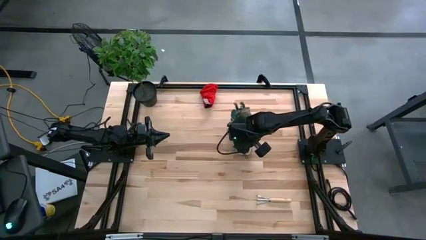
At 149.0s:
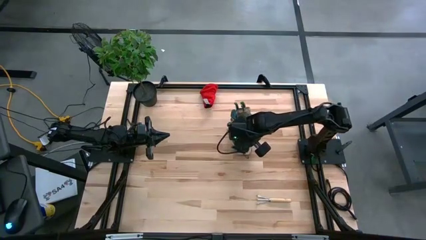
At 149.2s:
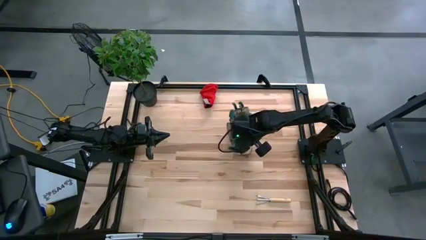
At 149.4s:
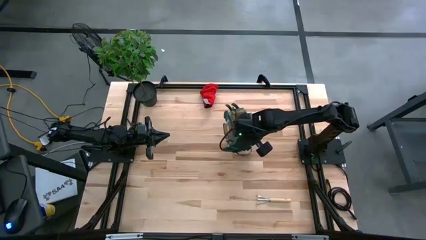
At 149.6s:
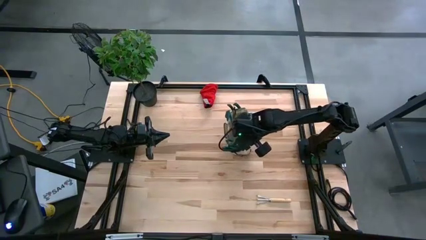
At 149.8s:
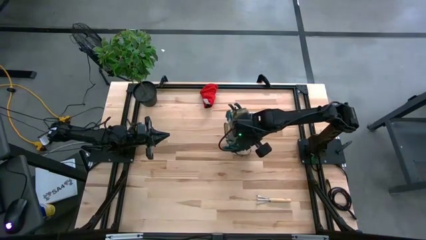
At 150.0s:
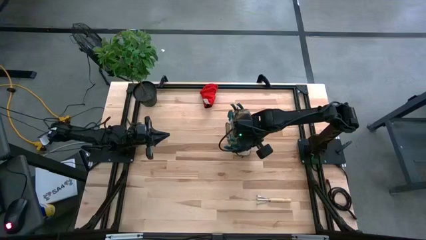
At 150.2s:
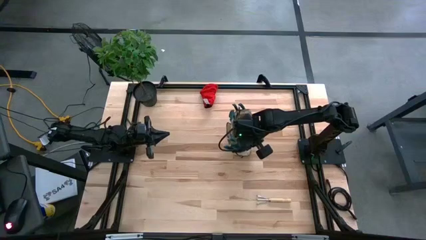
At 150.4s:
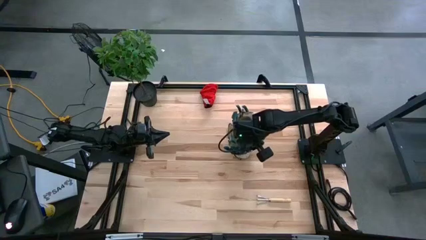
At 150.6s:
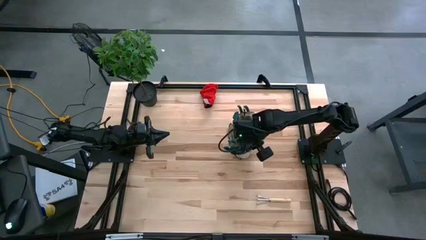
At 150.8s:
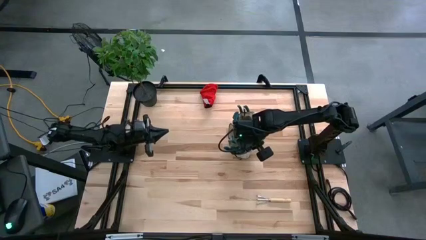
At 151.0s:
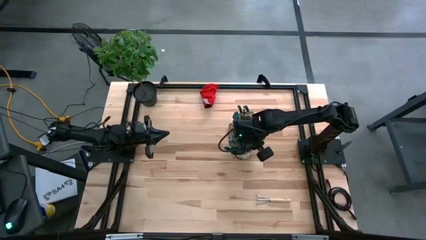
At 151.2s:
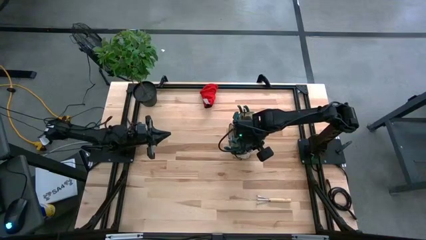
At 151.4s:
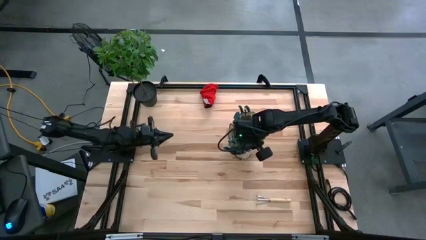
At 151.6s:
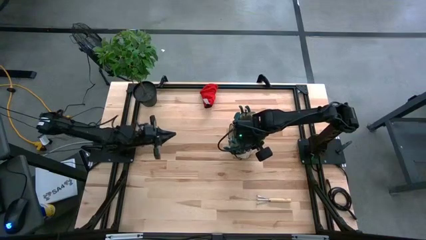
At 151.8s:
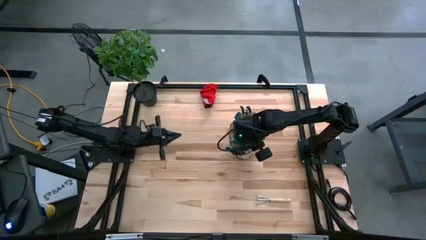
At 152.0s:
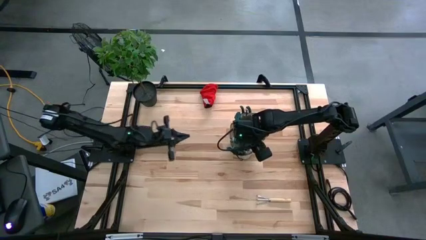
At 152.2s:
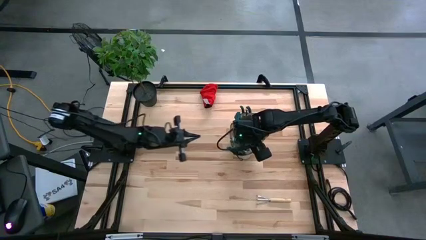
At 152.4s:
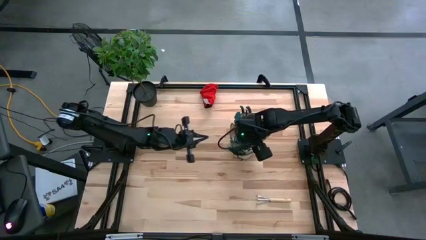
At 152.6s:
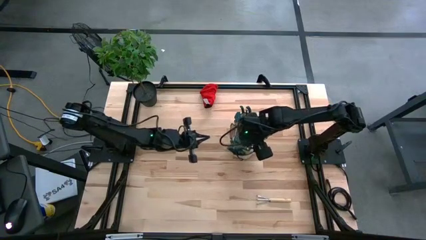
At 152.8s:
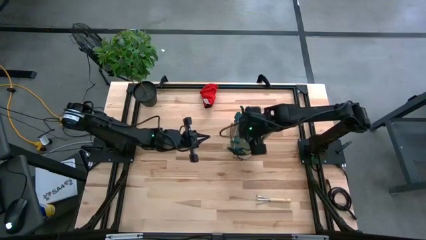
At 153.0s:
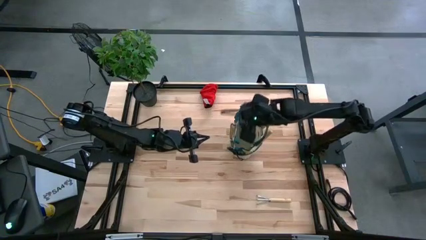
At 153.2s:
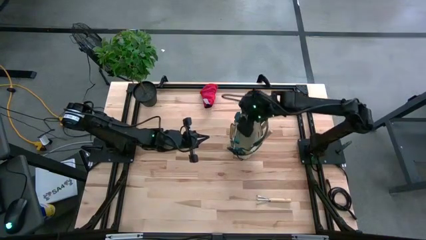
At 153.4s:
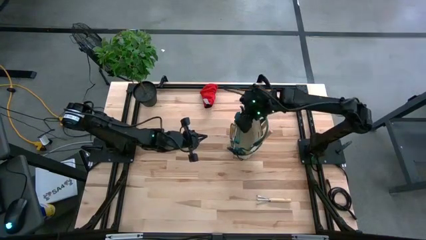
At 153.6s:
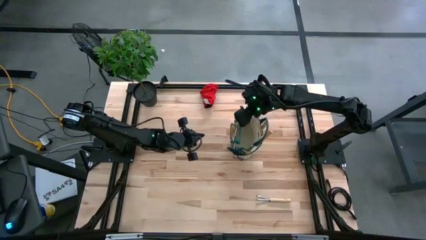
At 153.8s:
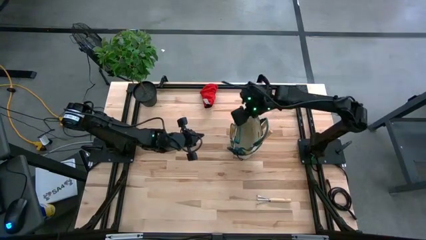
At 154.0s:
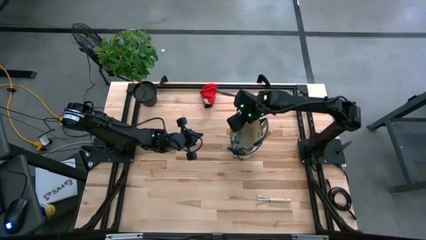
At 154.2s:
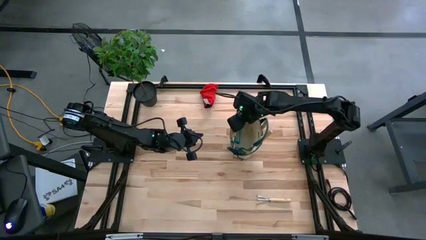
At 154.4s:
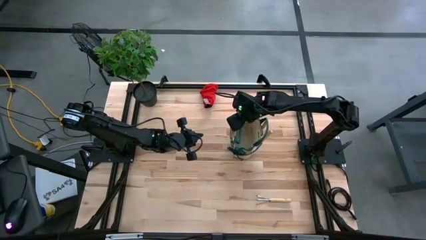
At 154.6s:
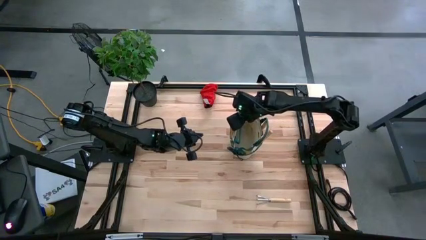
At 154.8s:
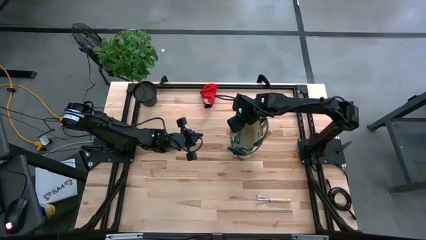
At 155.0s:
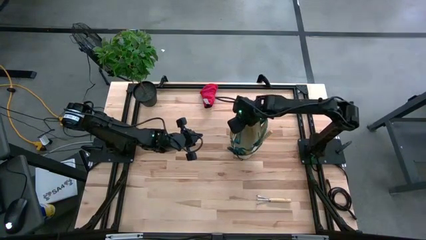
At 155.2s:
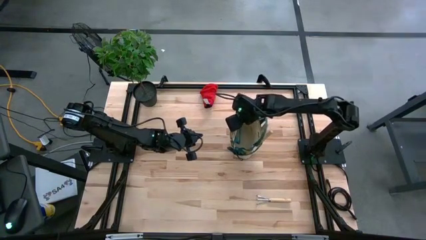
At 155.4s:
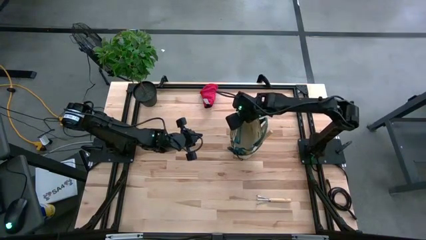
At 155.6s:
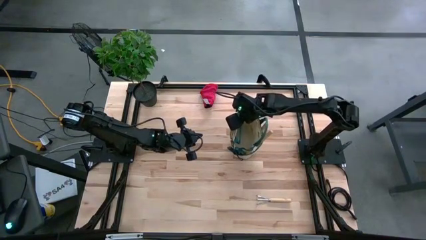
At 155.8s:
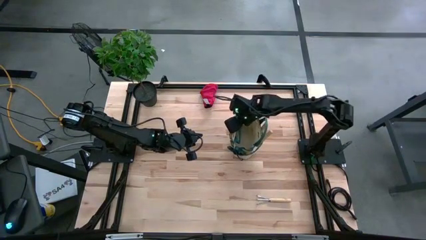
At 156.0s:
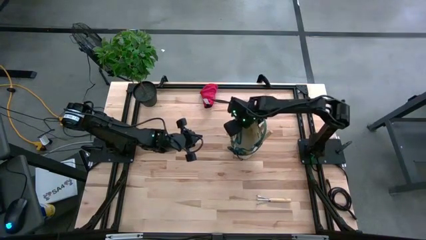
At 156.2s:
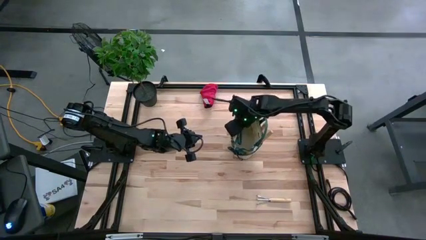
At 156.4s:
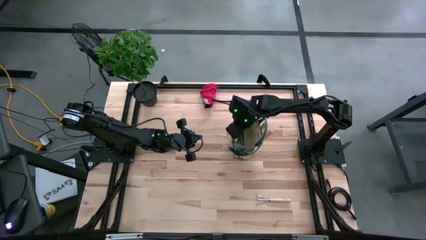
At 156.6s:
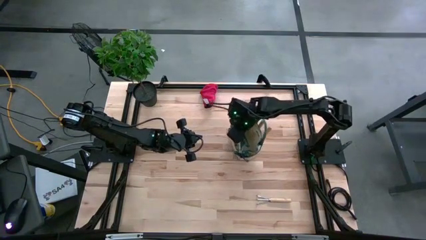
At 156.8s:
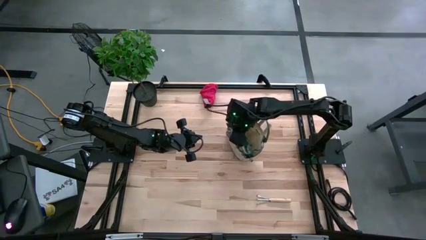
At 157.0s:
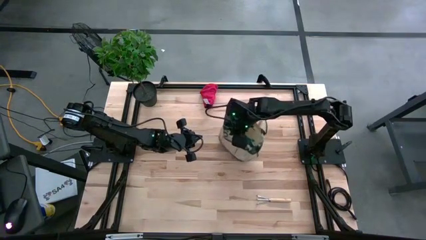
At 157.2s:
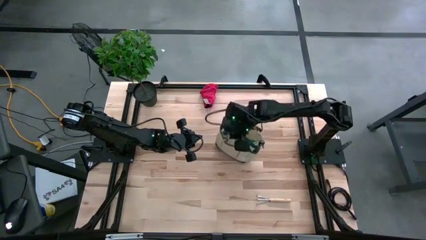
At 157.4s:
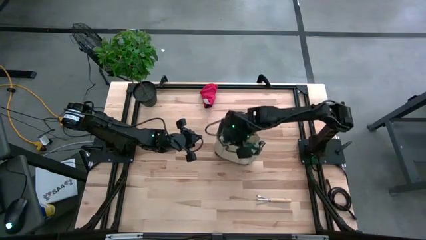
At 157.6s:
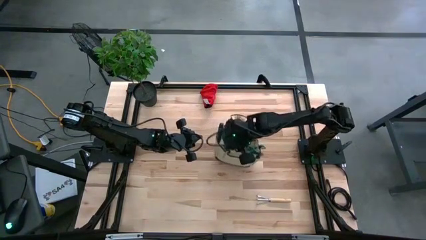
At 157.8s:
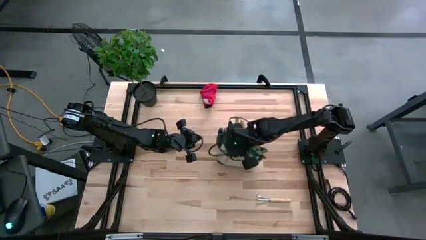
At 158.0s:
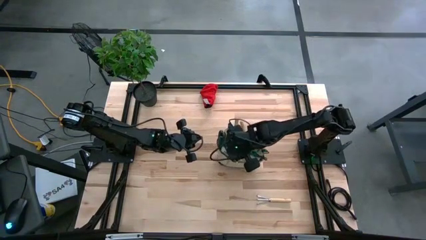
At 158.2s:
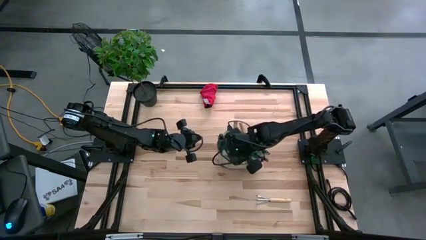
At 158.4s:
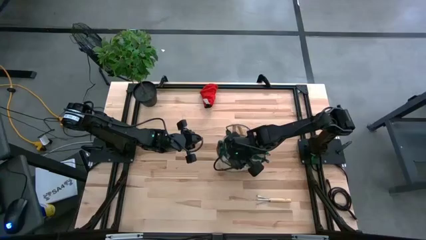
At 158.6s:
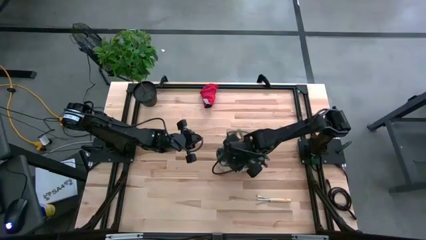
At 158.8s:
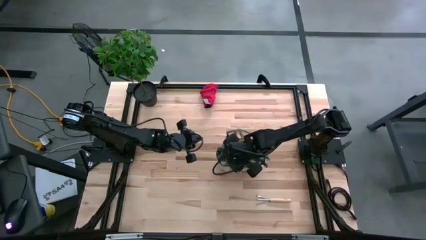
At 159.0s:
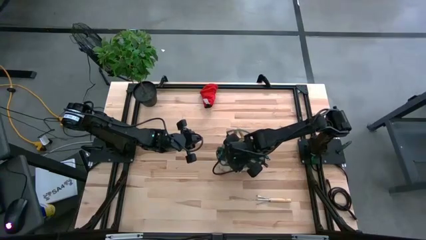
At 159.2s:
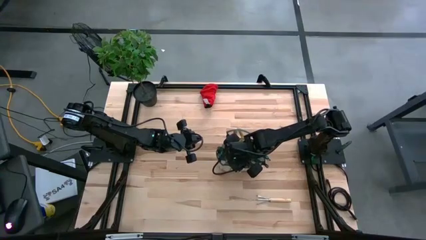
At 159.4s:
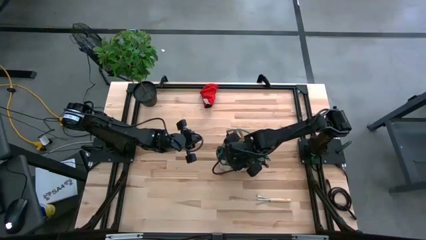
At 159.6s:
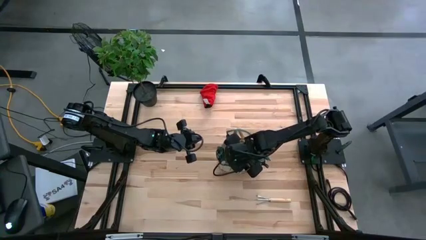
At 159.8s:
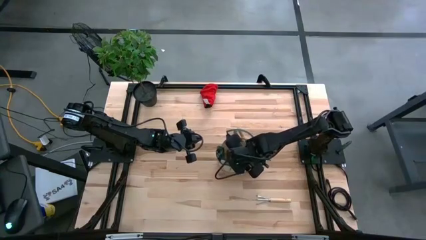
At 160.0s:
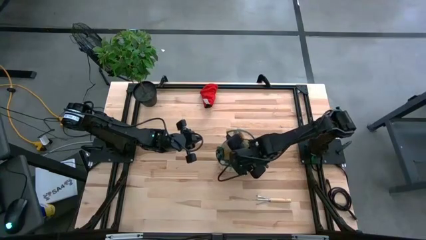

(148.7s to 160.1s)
Task: Pick & Place Garden tools in Gardening bag
Adjust the gardening bag

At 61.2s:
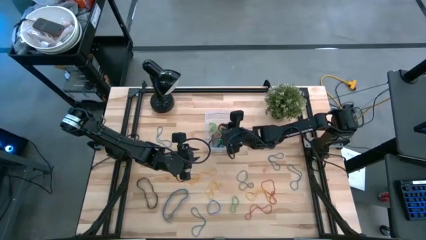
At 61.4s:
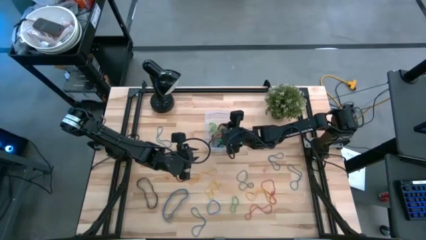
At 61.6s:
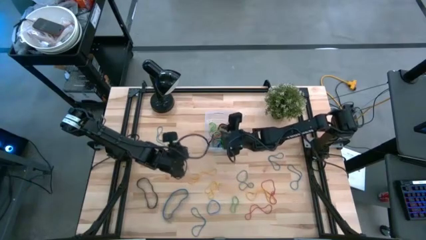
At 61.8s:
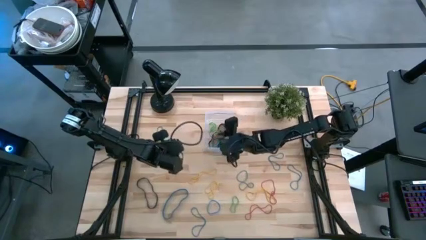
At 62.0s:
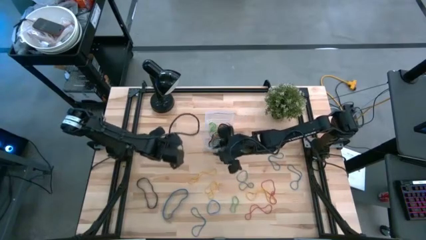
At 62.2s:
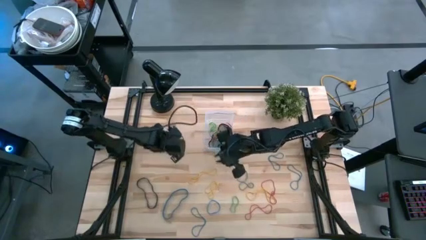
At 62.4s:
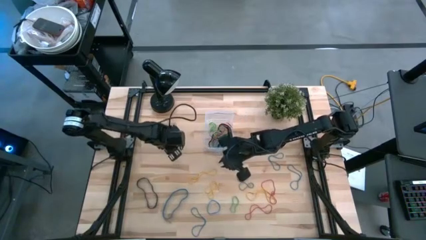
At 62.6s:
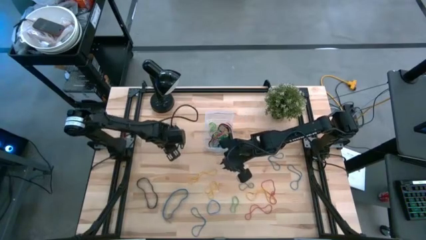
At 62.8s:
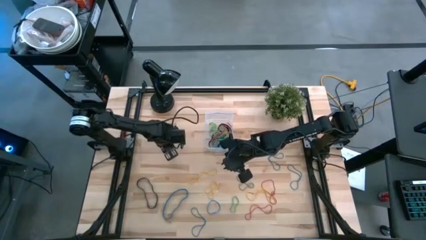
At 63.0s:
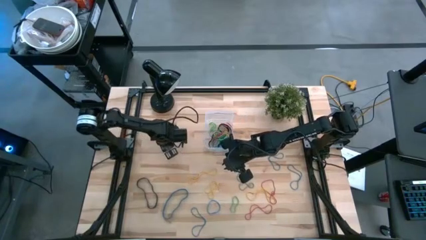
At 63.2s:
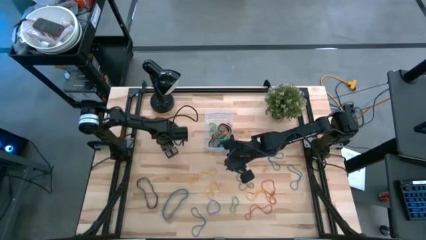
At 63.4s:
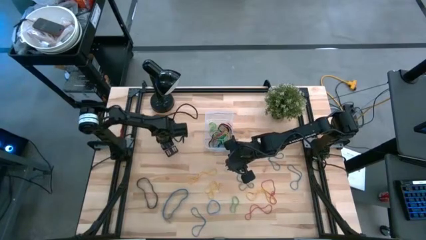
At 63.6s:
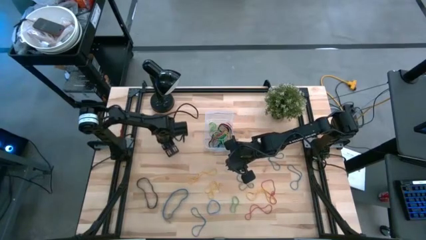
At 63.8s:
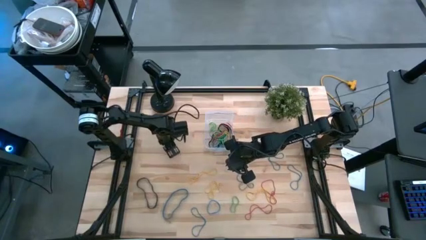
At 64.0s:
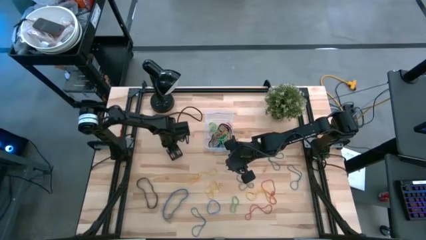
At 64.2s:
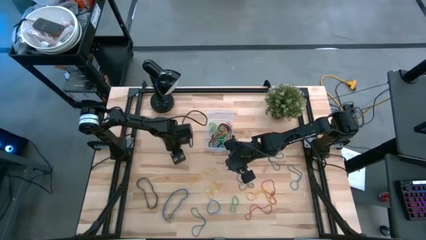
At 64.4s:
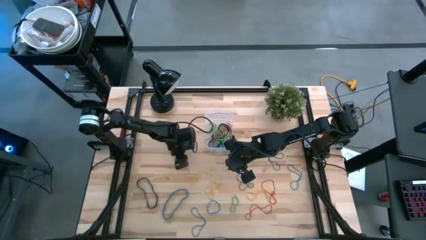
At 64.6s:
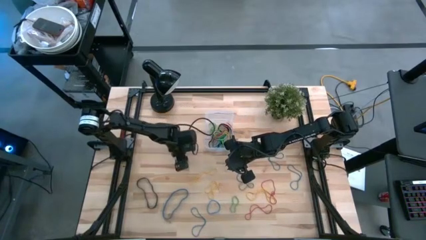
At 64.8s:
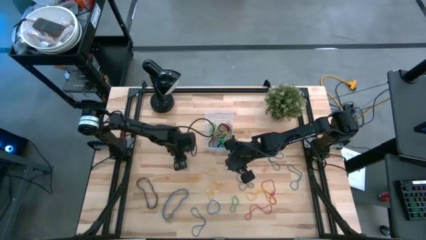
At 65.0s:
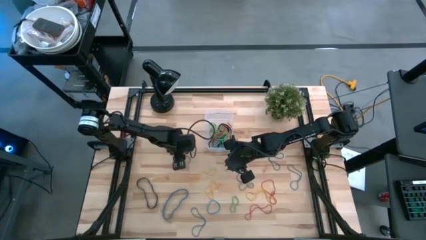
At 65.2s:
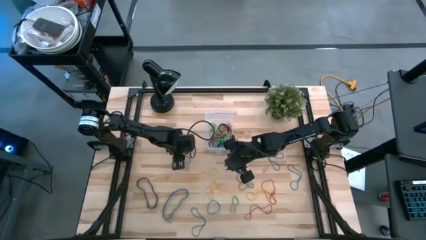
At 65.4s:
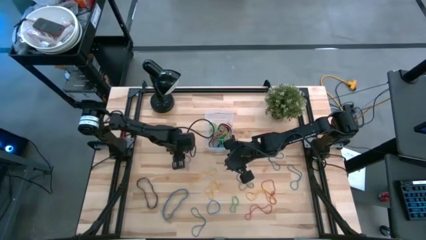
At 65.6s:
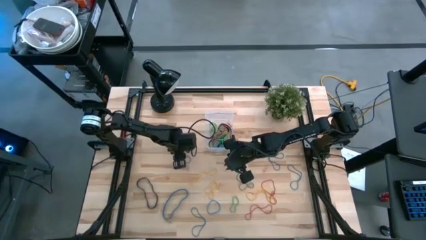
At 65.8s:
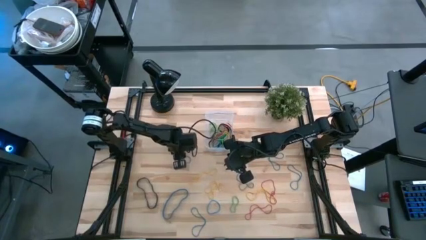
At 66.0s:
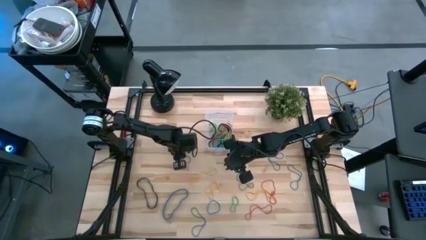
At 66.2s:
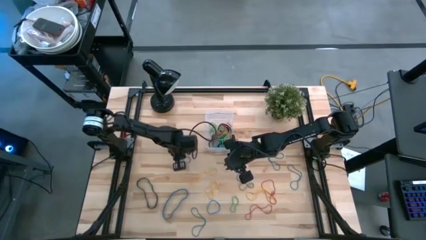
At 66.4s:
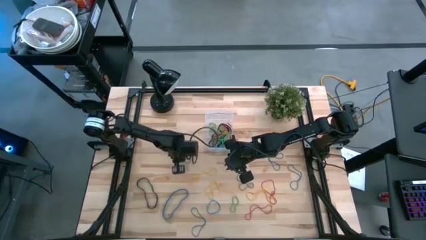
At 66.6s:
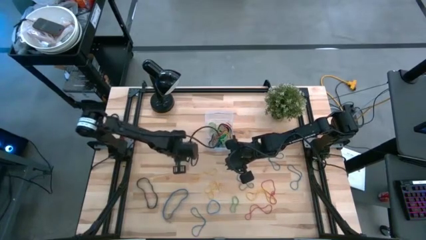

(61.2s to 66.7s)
Task: Pick and place rubber bands into bin
Put blue rubberband into the transparent bin
